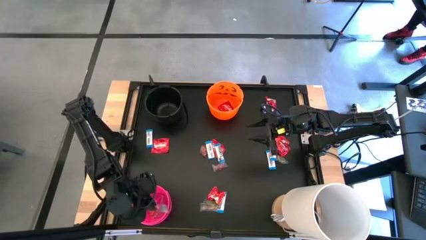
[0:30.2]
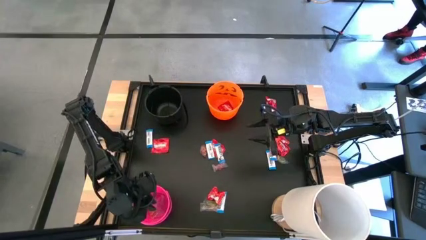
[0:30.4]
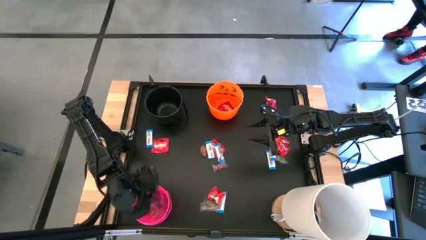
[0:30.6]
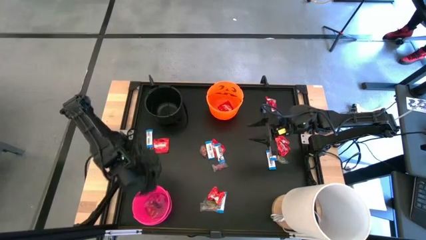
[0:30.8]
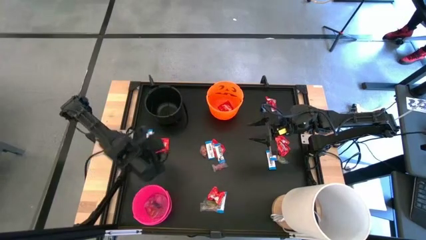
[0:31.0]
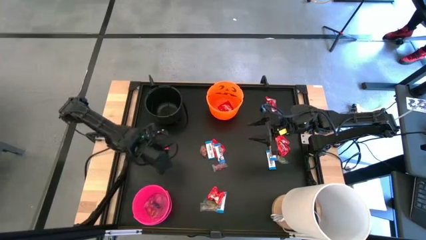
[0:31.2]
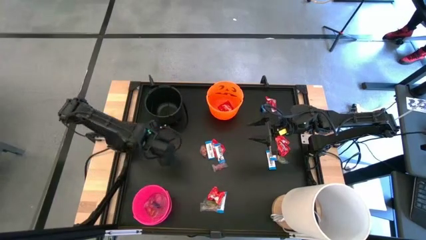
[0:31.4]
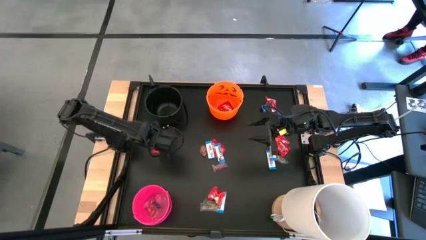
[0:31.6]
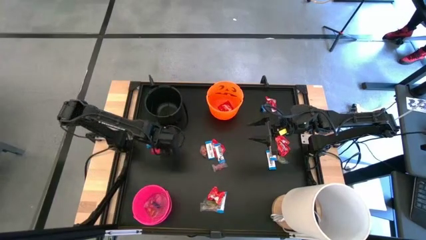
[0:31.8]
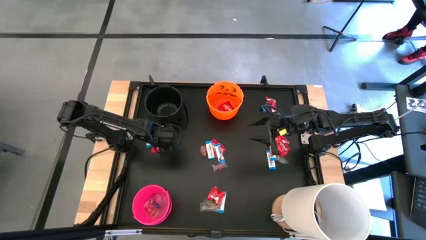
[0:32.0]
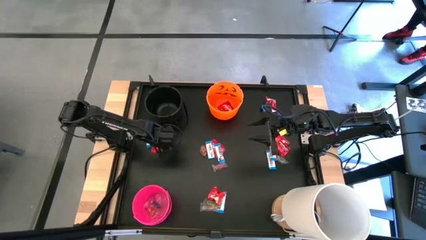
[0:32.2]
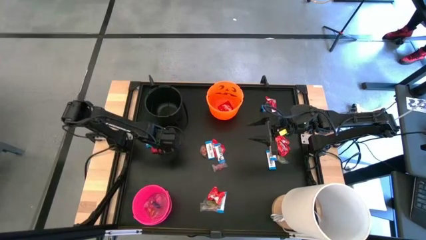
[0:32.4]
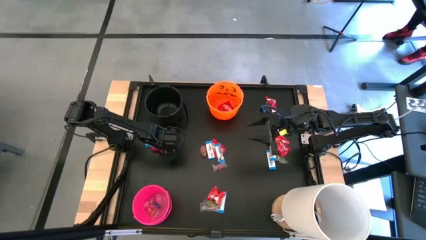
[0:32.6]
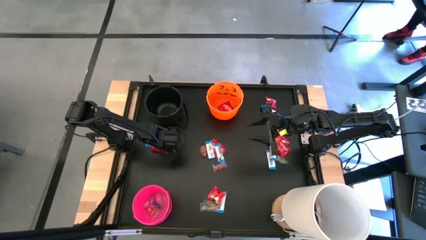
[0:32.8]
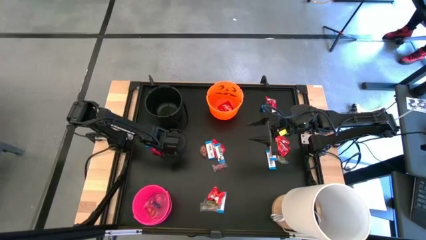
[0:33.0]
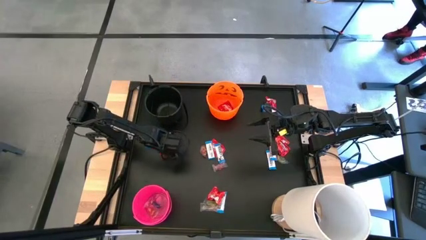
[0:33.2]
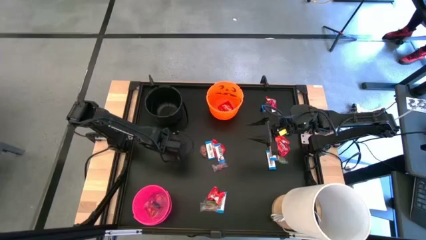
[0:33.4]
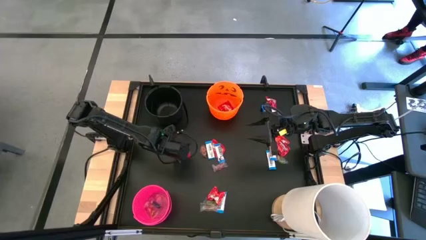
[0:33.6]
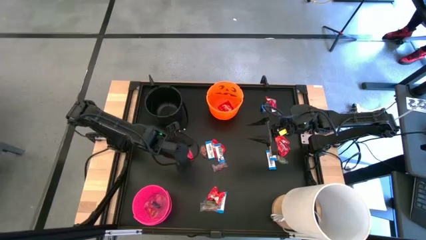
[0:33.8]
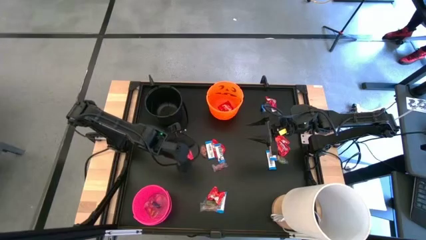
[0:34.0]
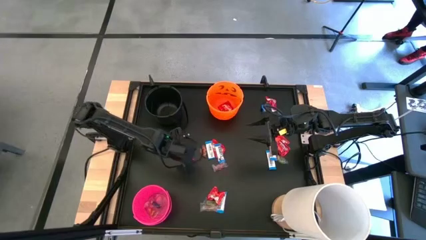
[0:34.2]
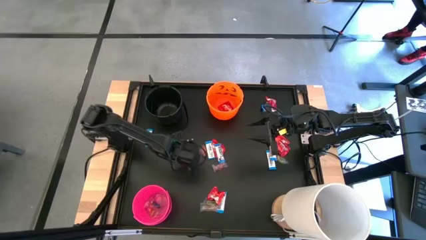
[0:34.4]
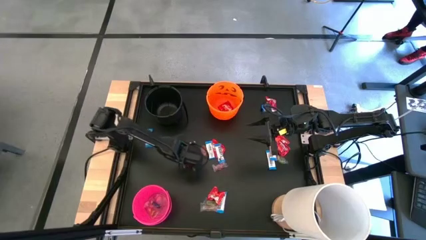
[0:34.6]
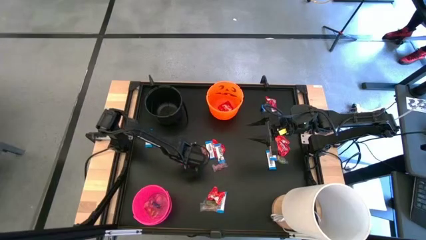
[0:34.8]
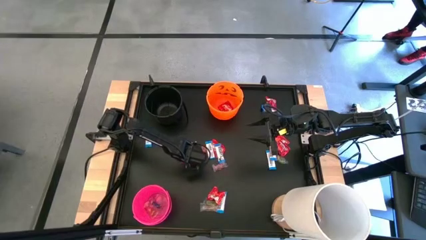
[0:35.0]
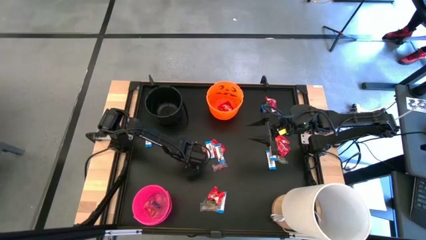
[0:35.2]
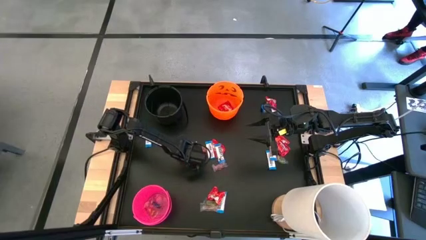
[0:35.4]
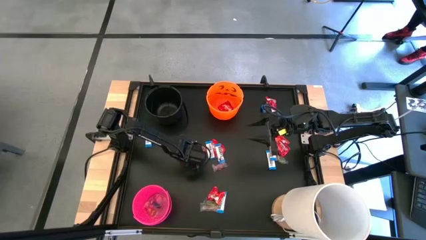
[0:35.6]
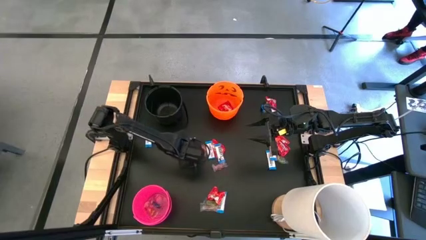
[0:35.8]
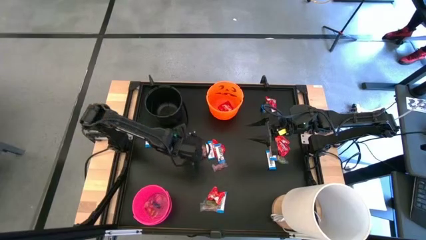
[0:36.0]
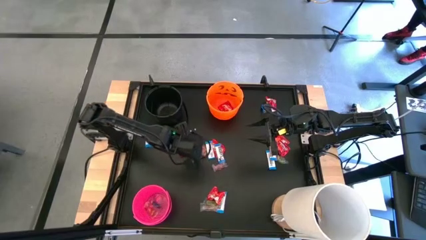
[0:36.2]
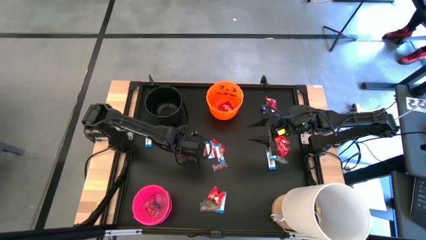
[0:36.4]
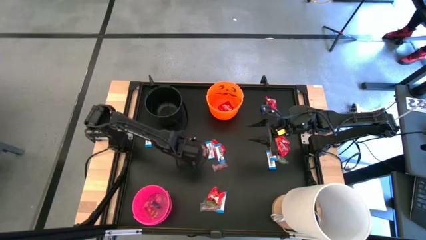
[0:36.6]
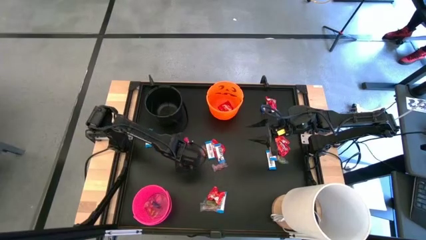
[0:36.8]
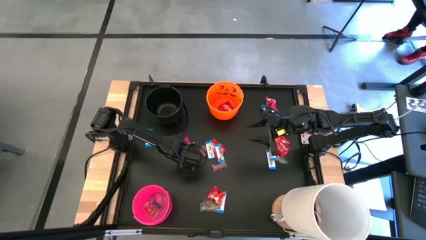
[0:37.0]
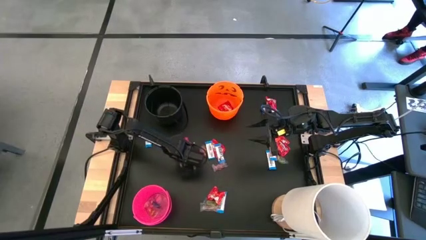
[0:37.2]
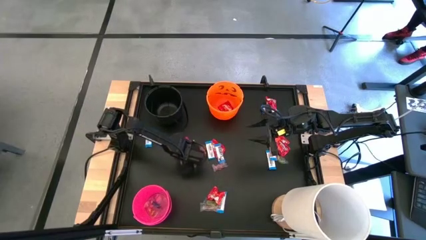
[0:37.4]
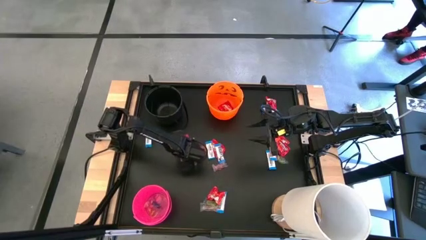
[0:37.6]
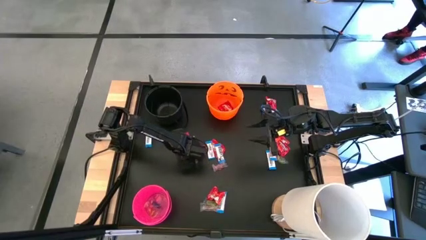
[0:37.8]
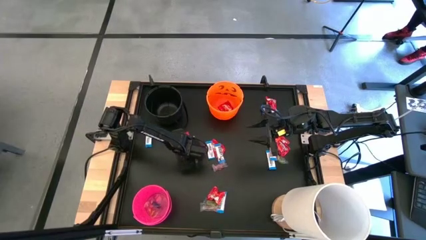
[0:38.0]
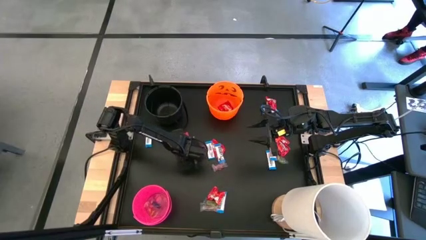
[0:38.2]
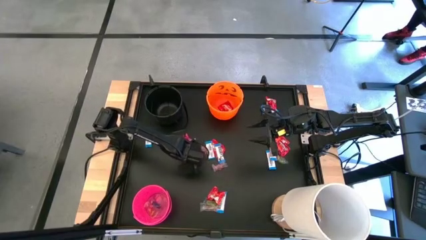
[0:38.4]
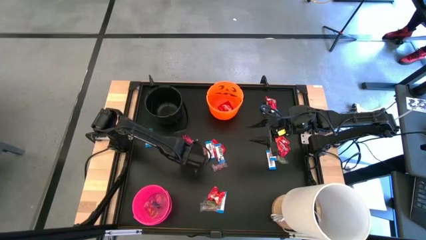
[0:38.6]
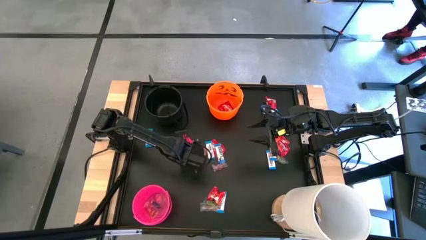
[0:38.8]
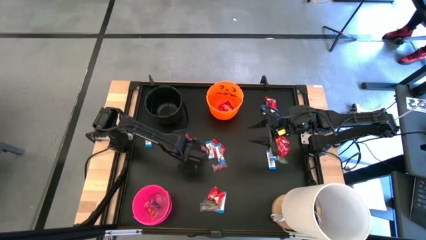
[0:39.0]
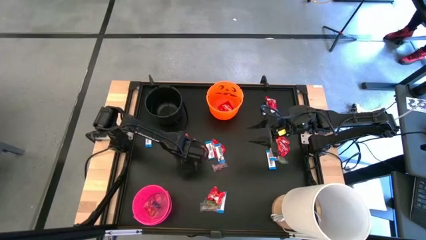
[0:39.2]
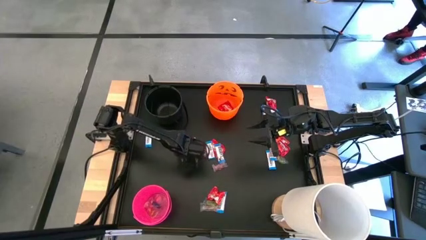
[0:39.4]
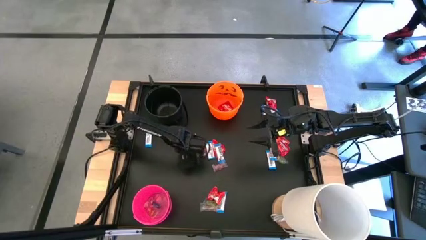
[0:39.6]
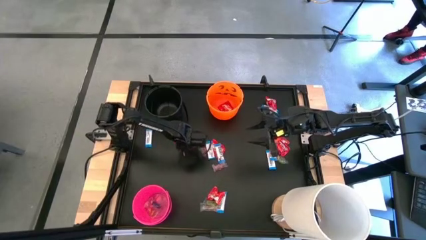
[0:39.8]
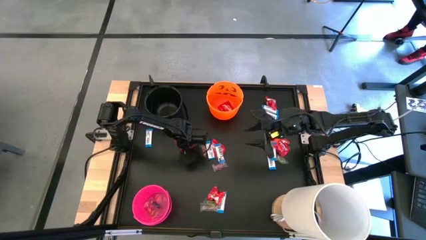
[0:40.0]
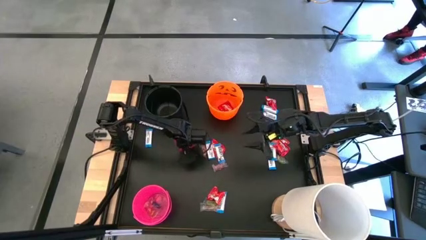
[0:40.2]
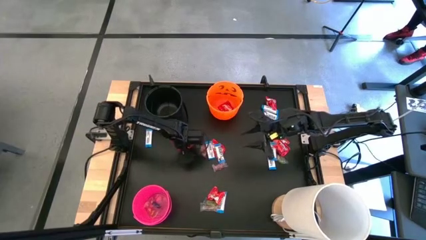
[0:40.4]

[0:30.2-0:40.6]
Task: Sort candy
Put the middle left red candy into the orange bin

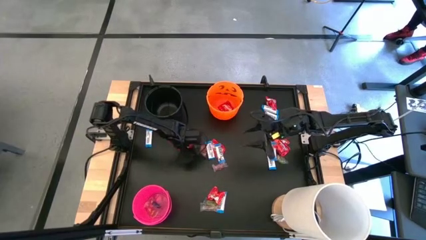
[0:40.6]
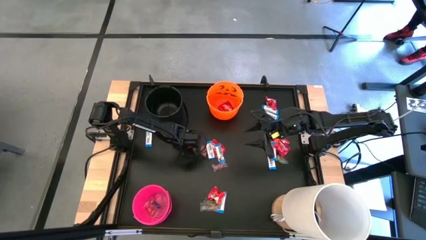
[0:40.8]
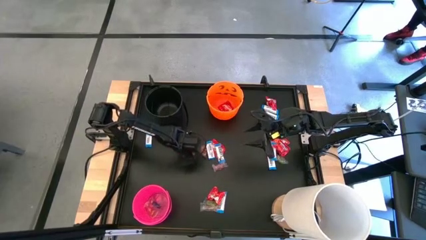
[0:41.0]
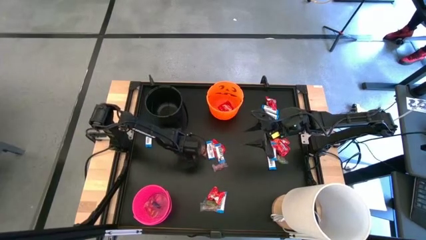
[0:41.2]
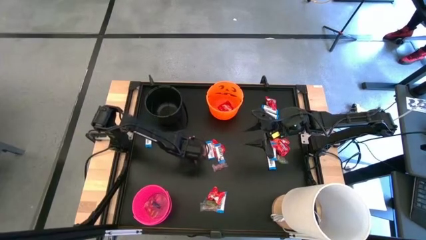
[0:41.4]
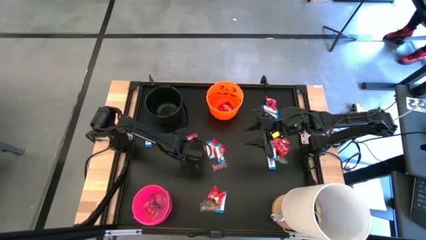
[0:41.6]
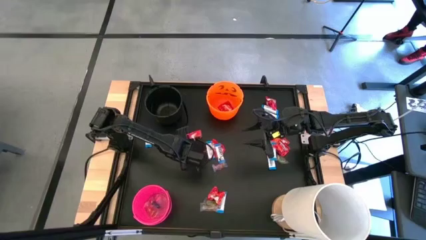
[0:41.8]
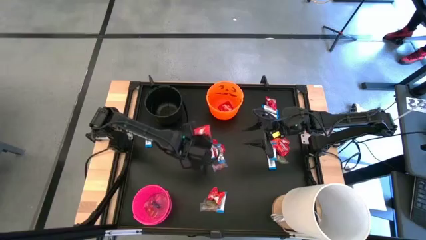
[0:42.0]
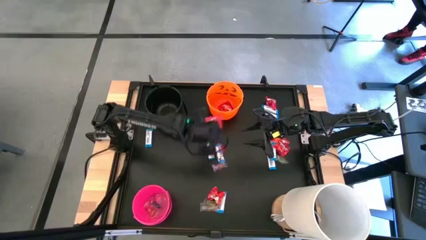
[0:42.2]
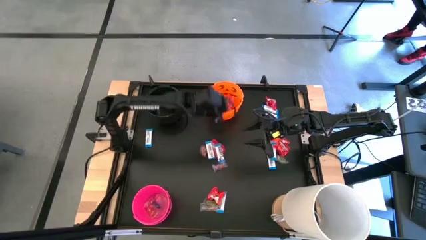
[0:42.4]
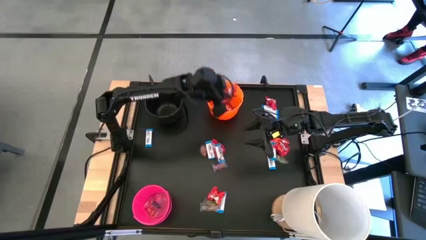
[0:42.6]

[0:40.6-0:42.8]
Put the middle left red candy into the orange bin

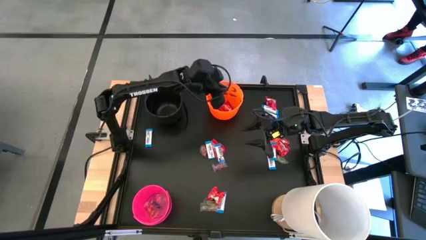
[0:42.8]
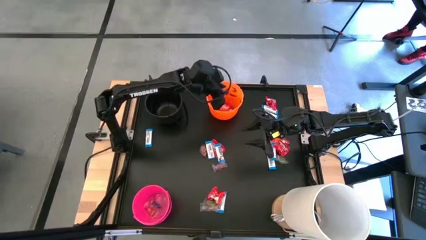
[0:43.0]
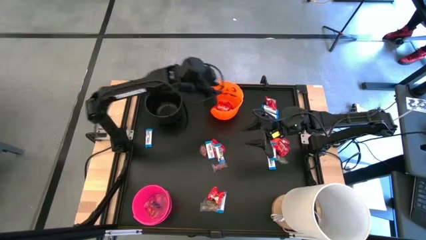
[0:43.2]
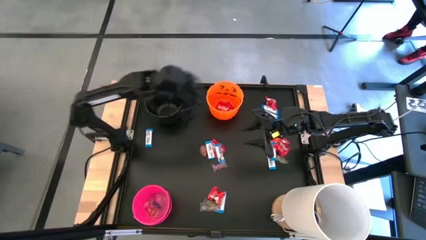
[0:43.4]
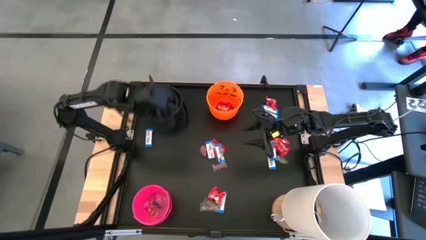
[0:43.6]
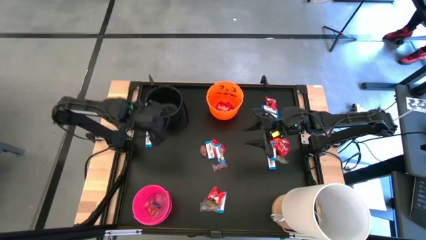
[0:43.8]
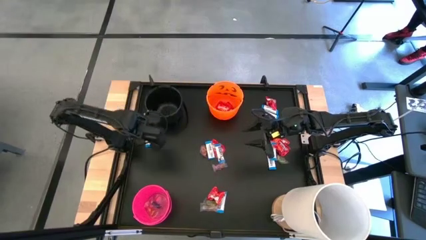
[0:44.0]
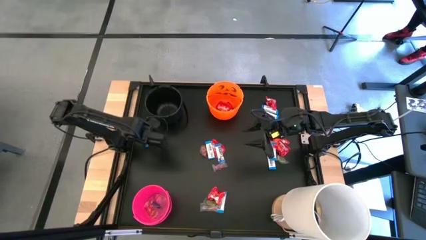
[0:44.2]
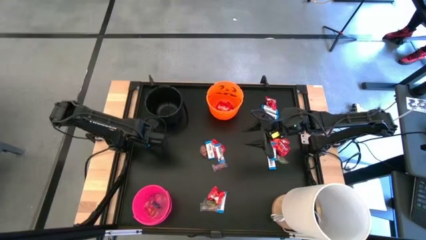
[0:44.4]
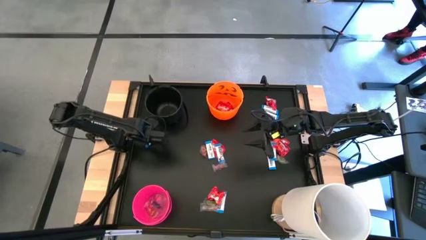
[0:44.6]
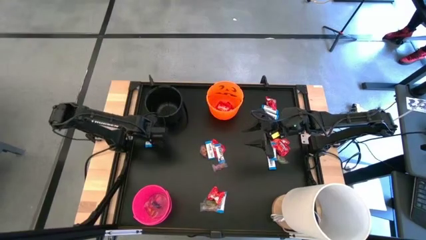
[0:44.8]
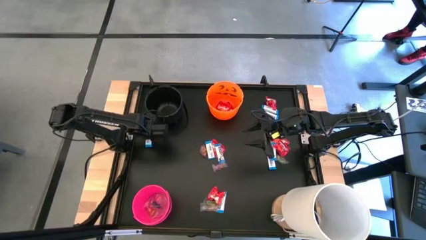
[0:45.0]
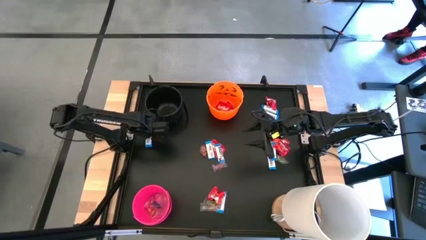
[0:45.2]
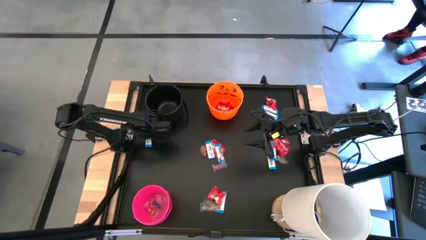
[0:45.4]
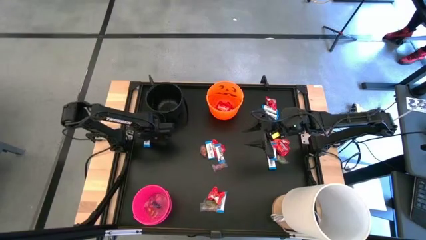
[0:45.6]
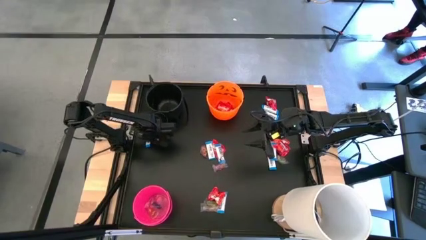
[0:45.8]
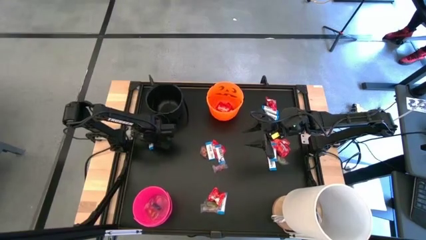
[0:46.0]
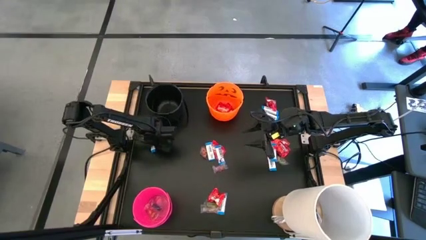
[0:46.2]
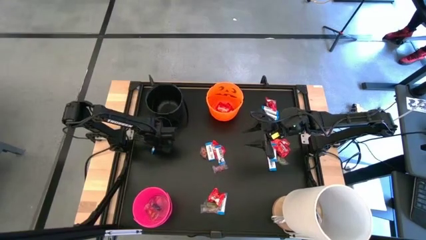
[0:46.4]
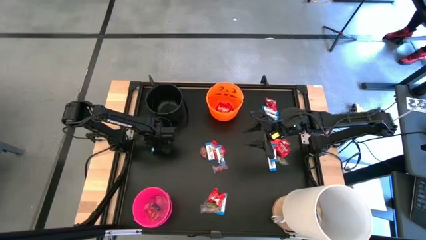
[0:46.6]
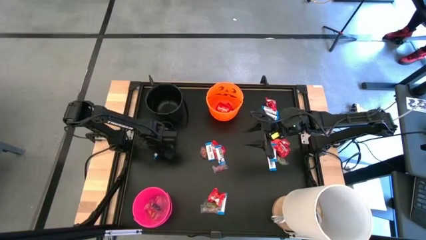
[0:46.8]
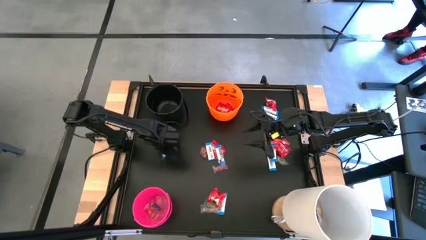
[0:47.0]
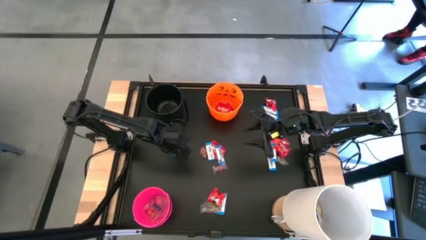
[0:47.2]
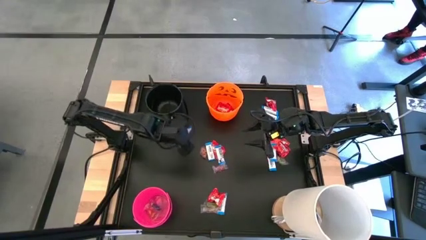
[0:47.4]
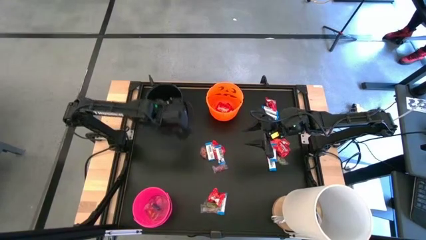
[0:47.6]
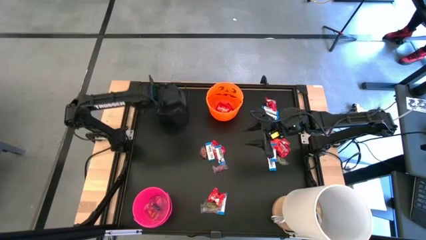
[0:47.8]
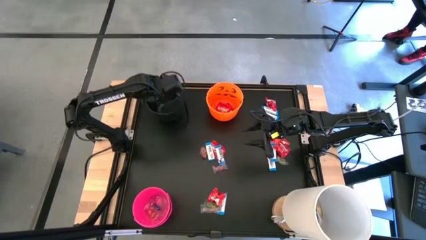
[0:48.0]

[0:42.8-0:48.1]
Put the middle left white candy into the black bin
